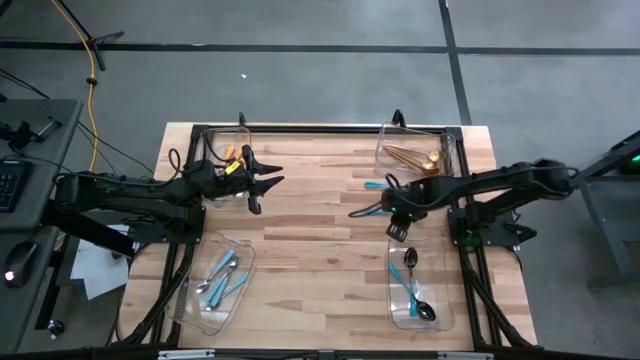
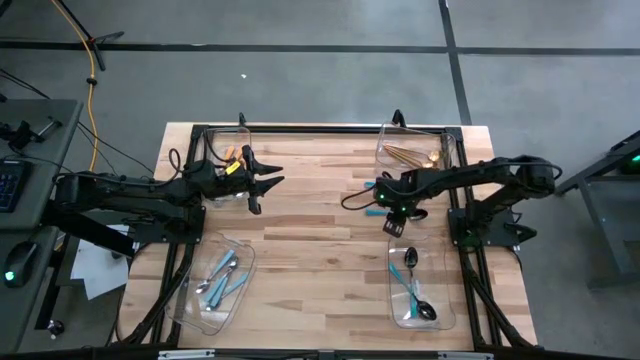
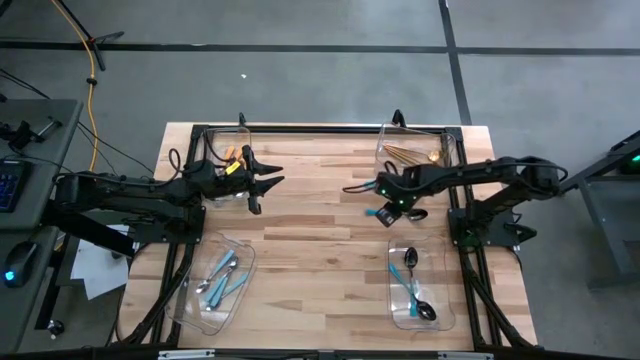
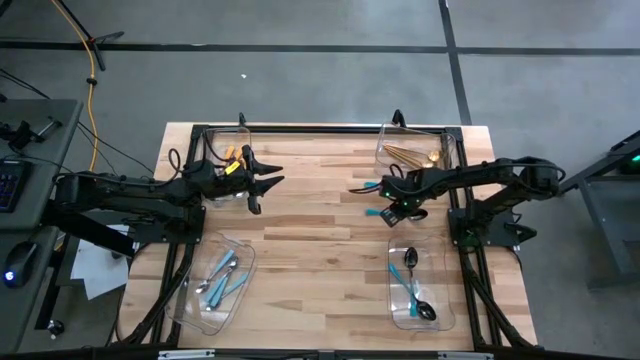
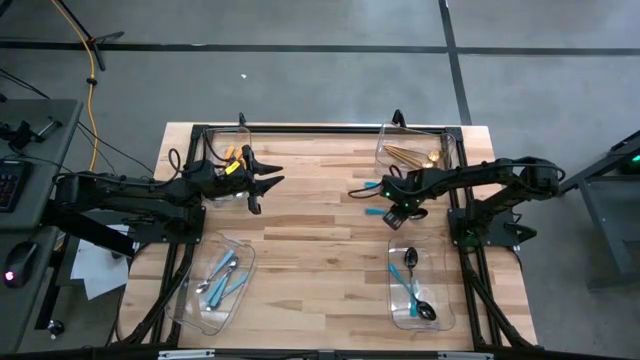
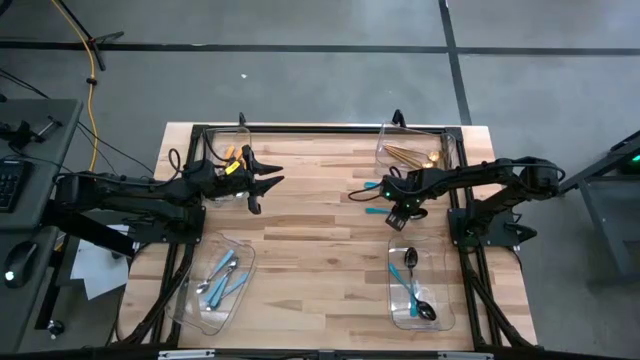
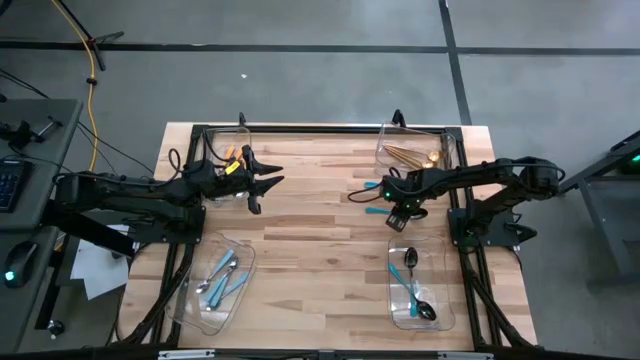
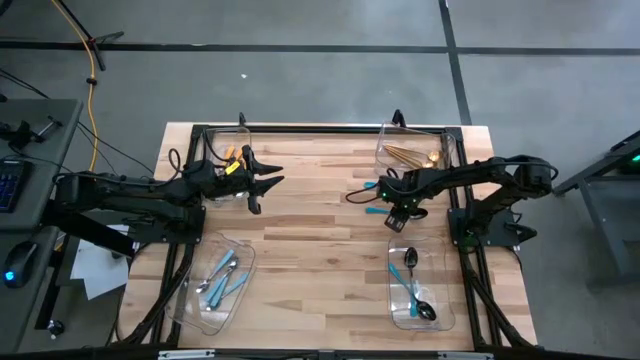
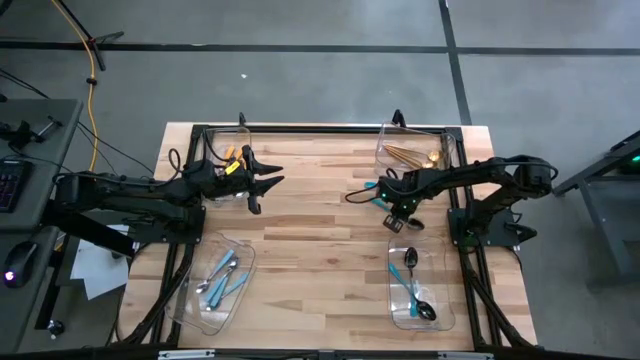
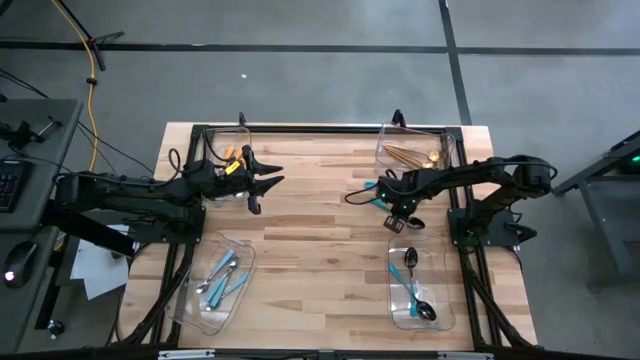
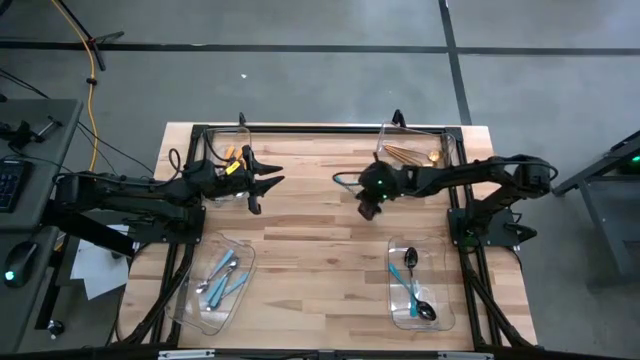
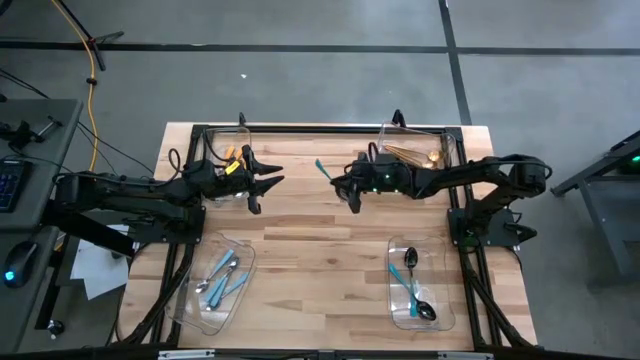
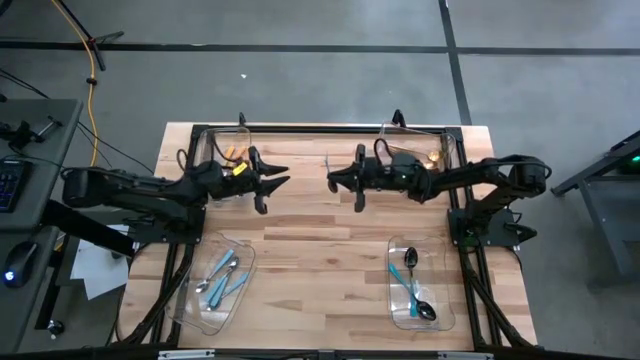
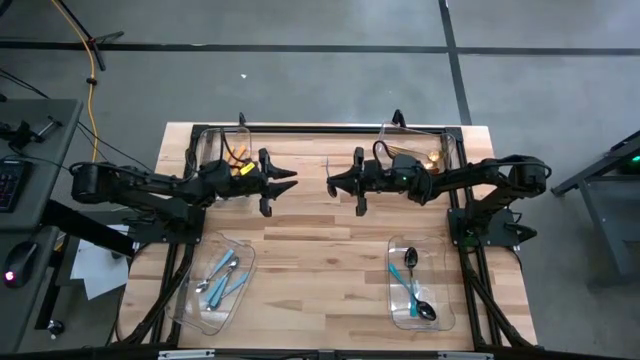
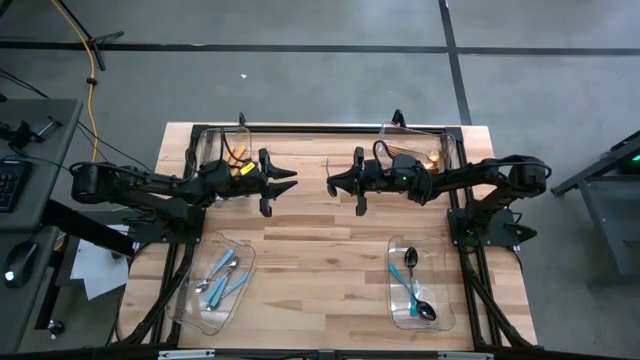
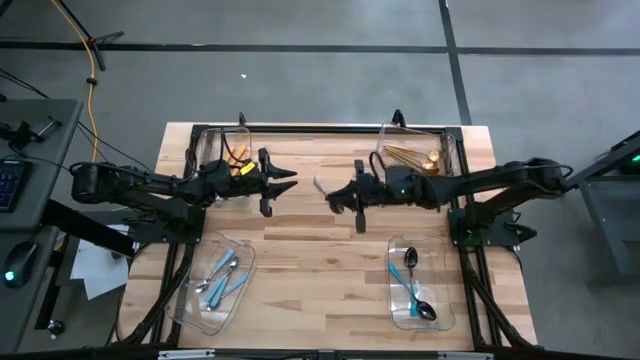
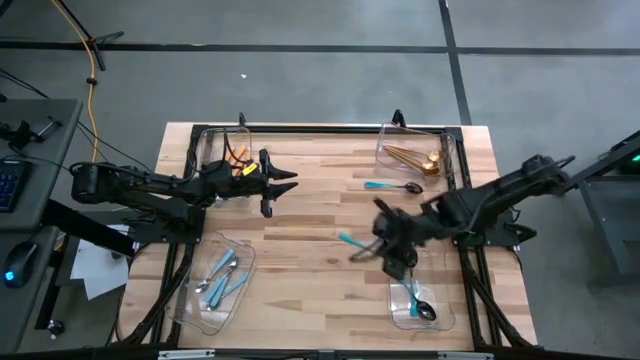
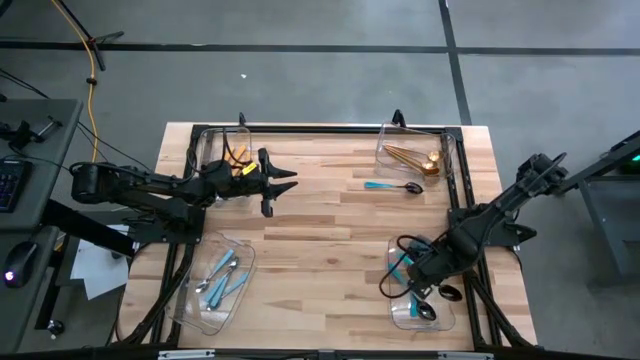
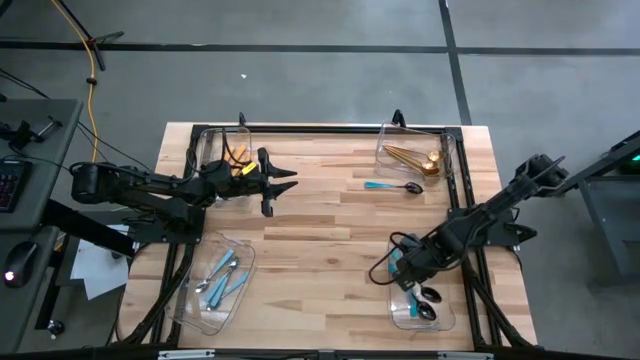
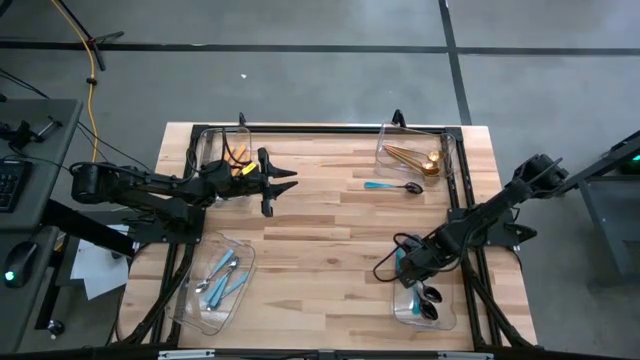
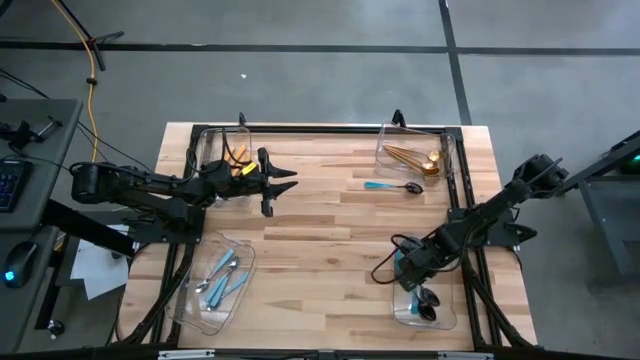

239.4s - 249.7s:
Task: Sort silverware by color (type)
Put the blue spoon into the bottom right transparent bin

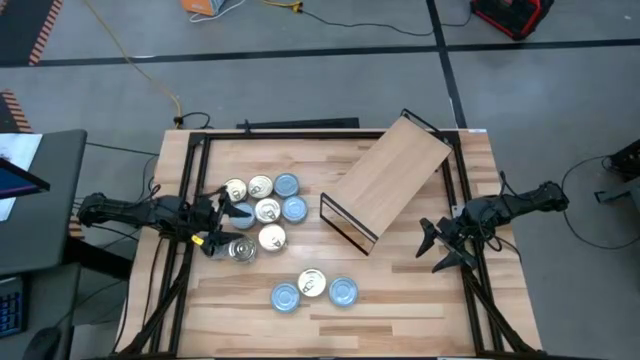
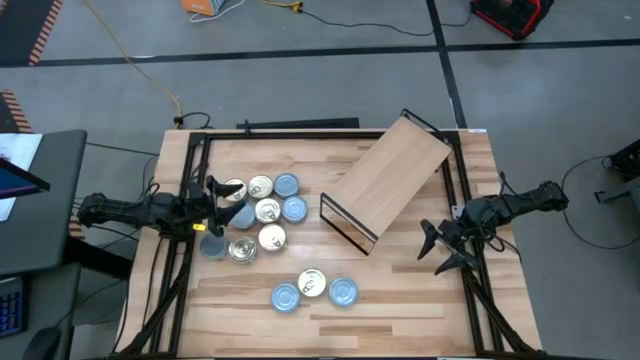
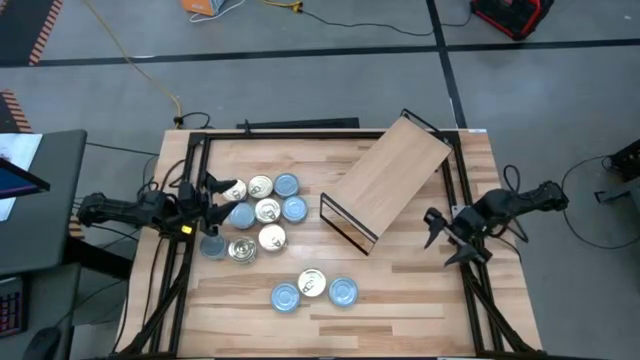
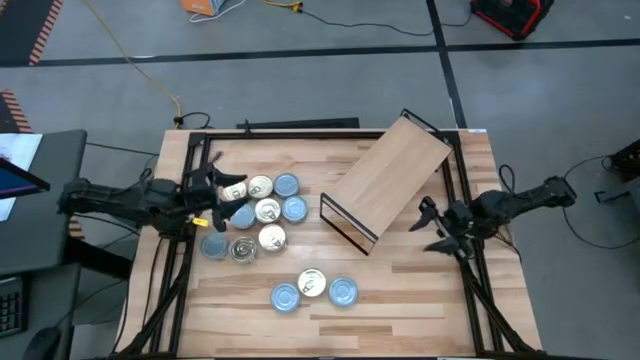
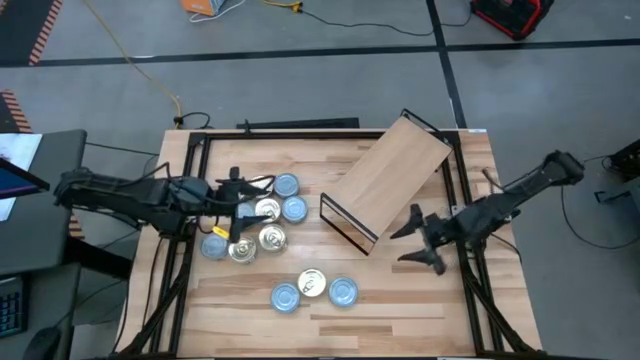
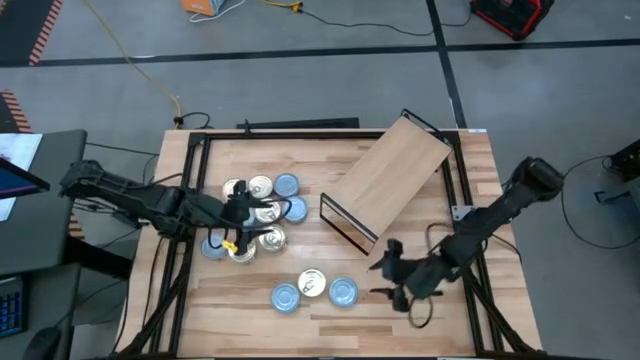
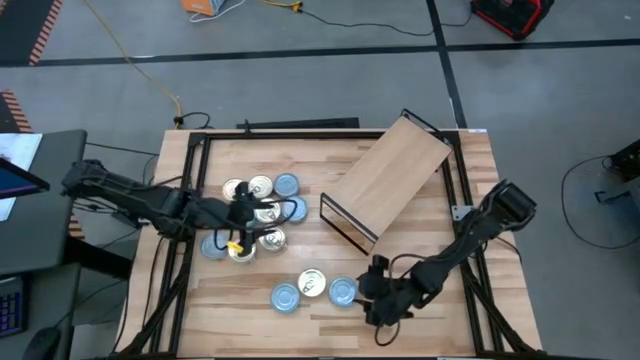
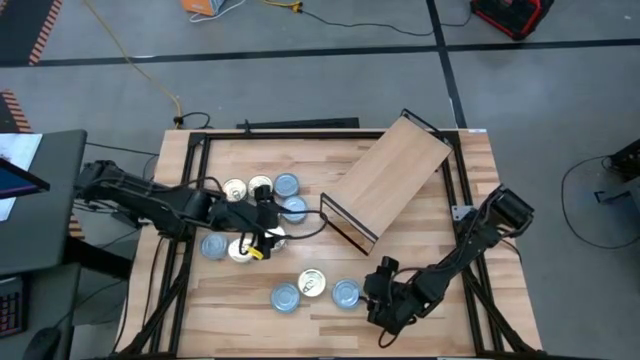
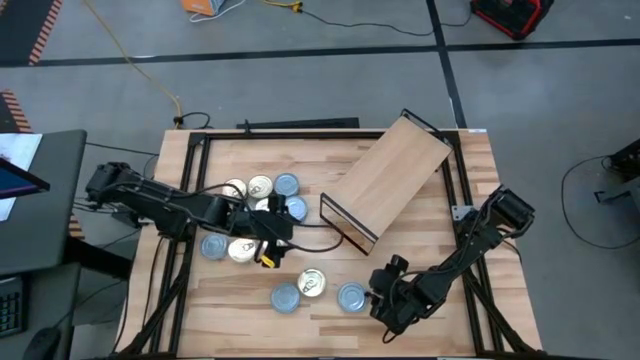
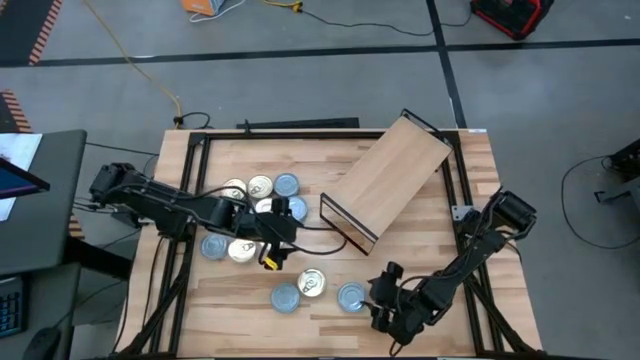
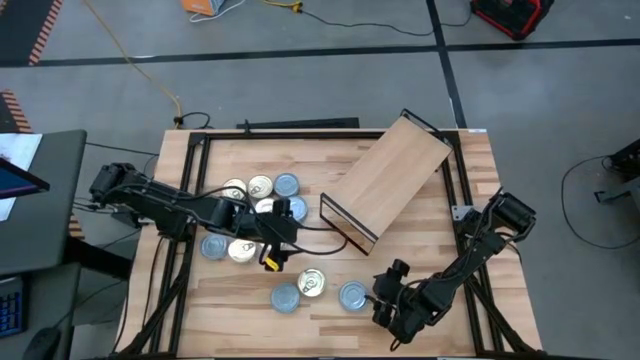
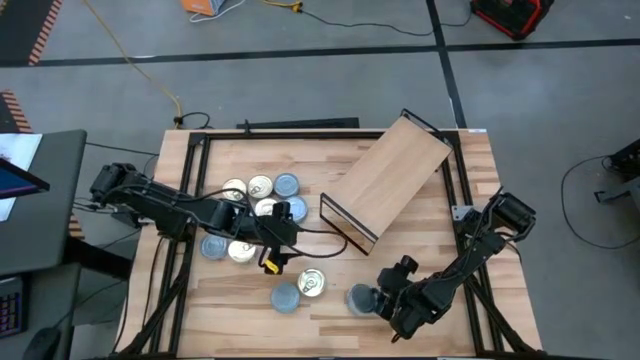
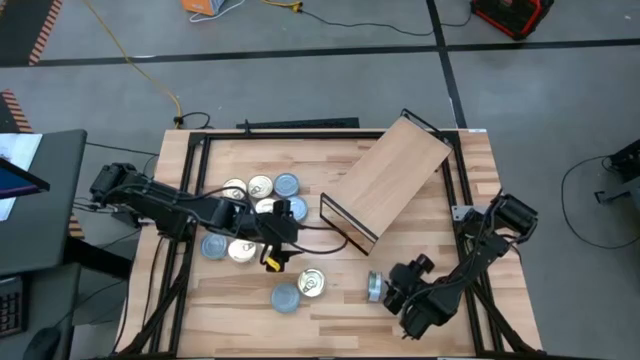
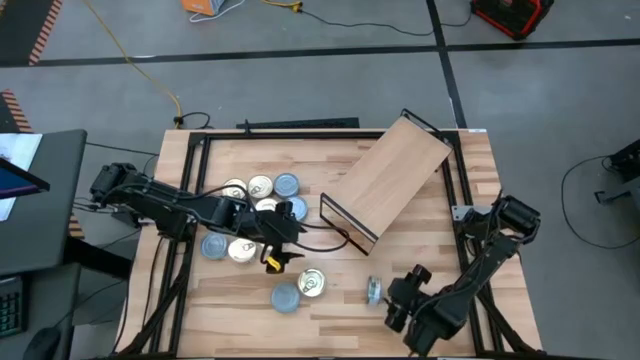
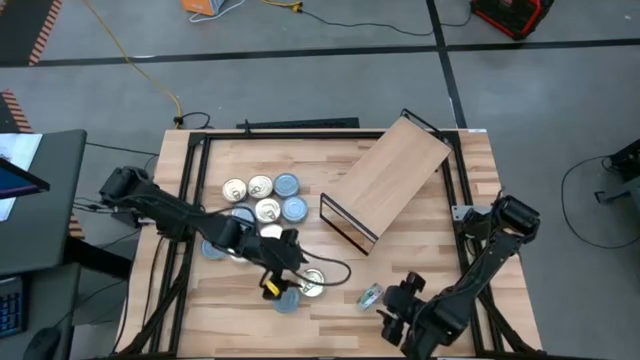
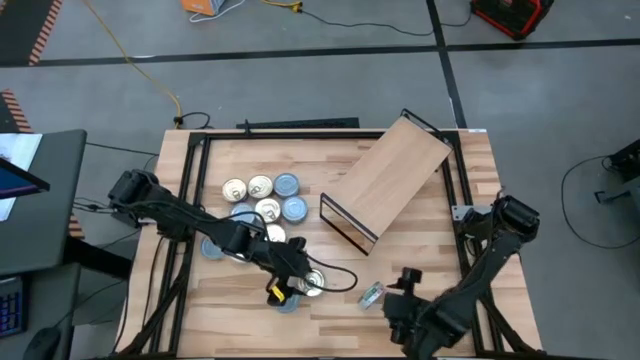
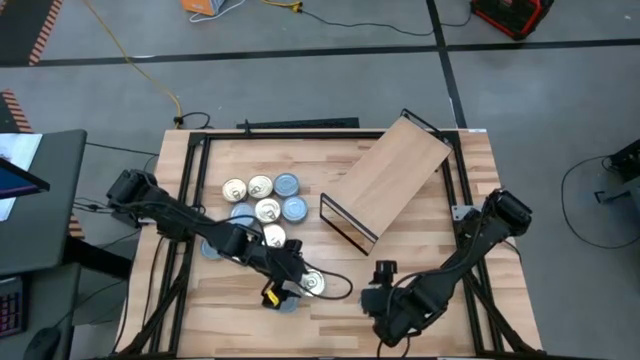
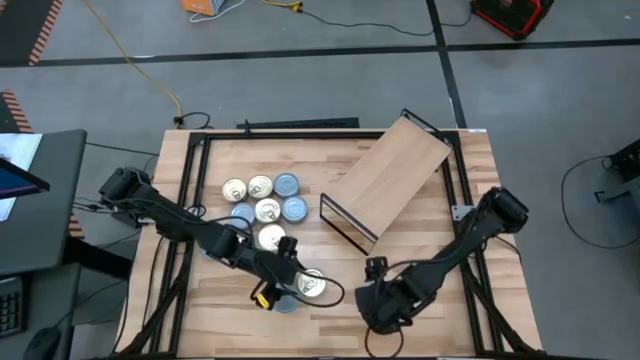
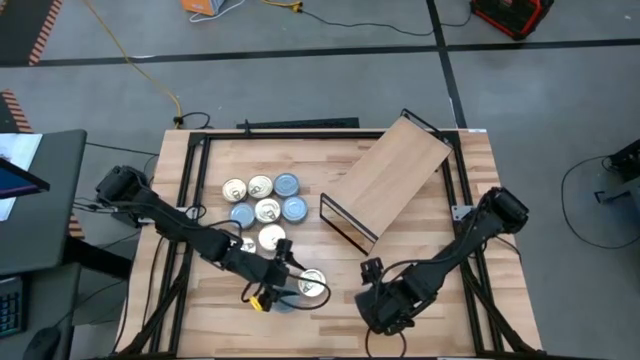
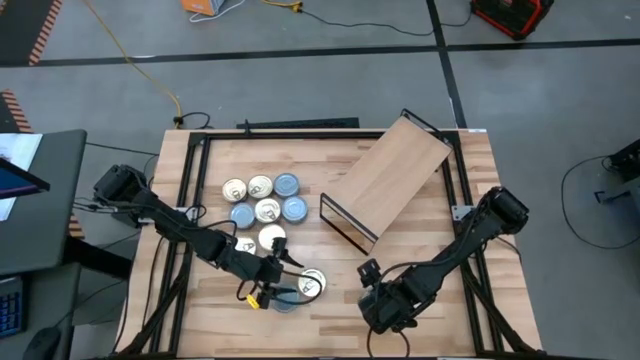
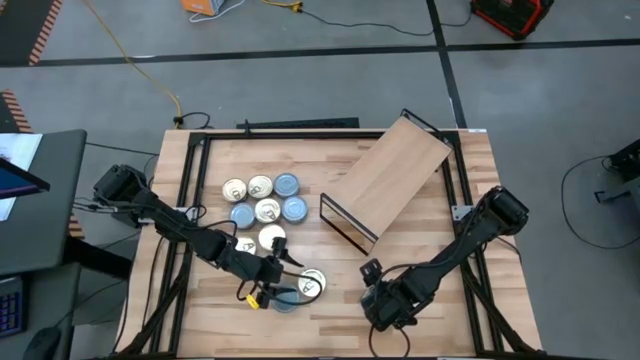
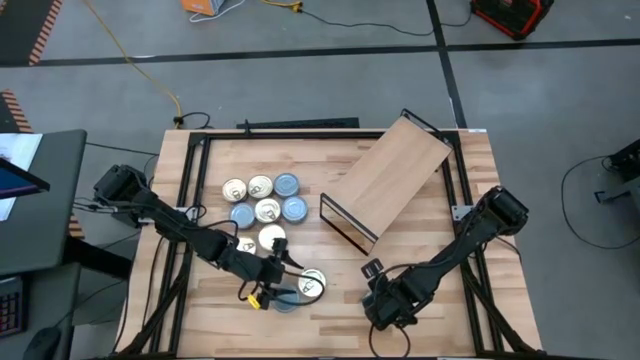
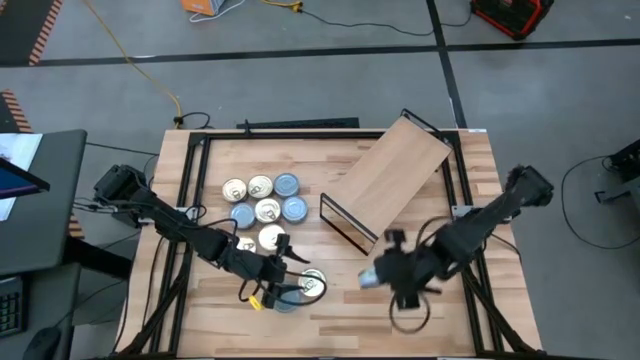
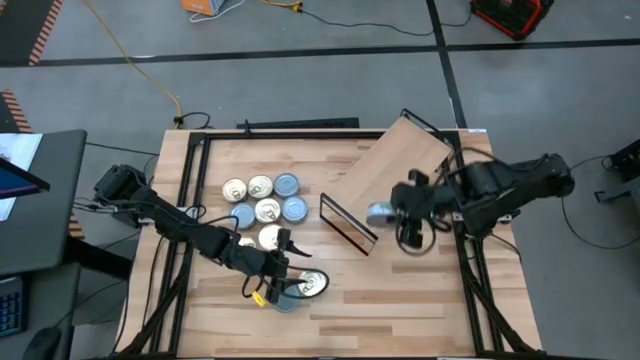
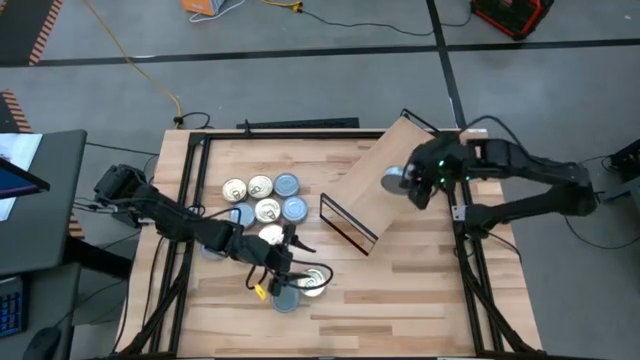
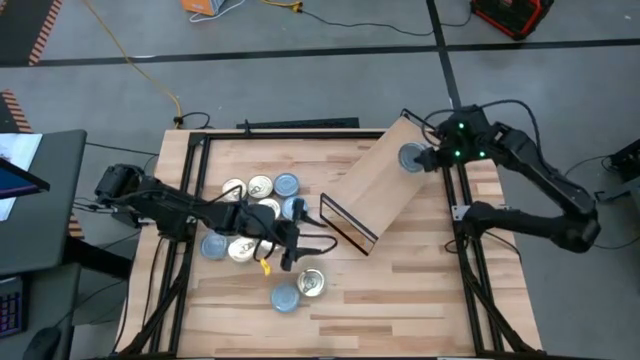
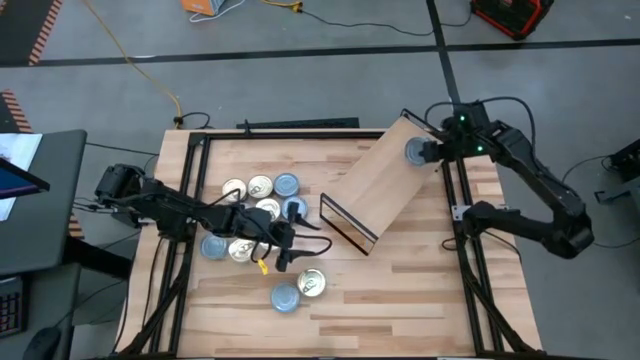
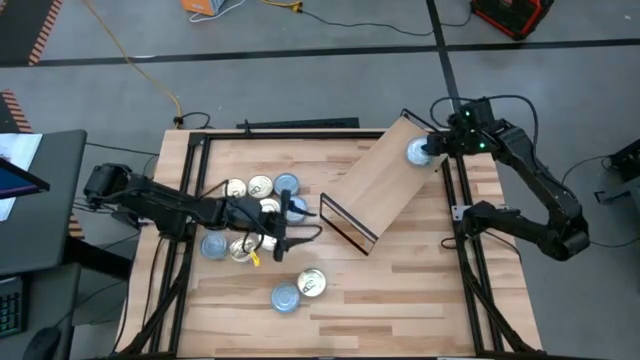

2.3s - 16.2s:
Task: Stack canned seafood by type on shelf
Put the green tuna can on the shelf
